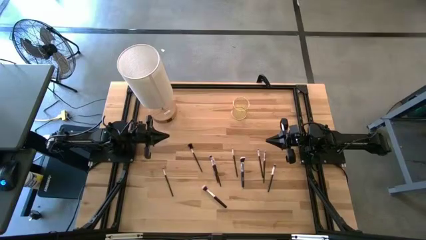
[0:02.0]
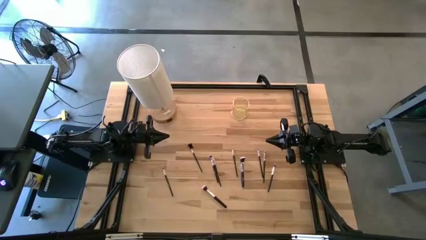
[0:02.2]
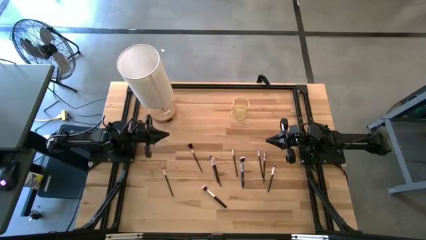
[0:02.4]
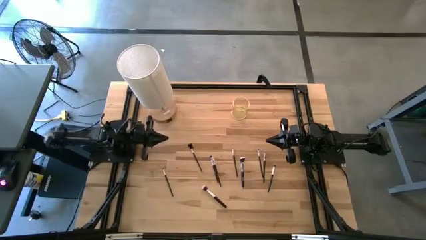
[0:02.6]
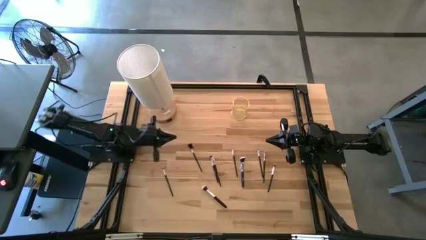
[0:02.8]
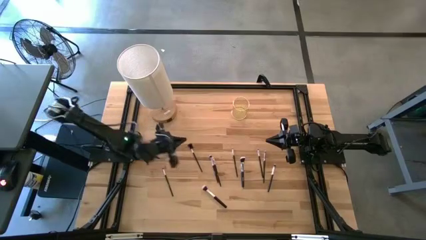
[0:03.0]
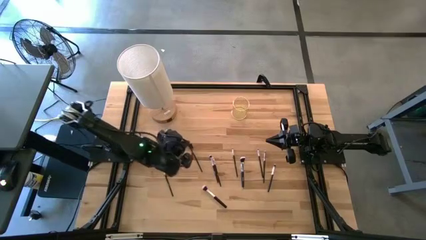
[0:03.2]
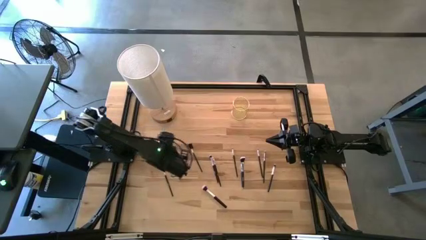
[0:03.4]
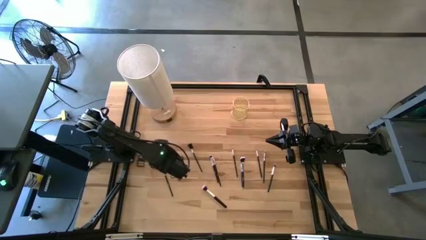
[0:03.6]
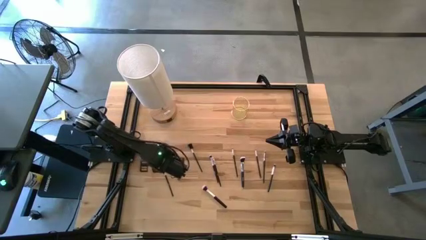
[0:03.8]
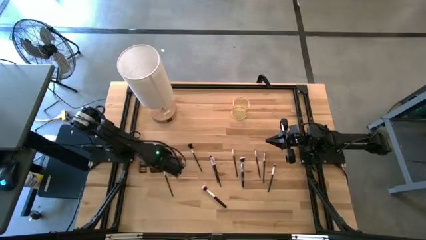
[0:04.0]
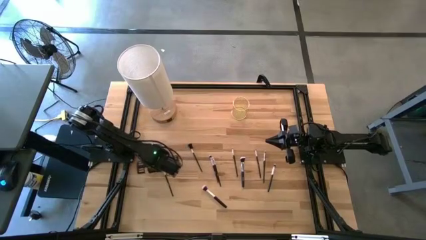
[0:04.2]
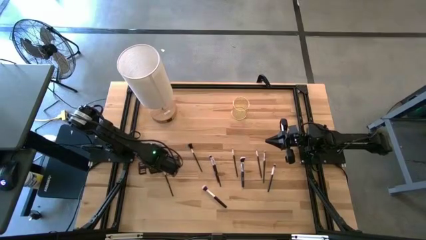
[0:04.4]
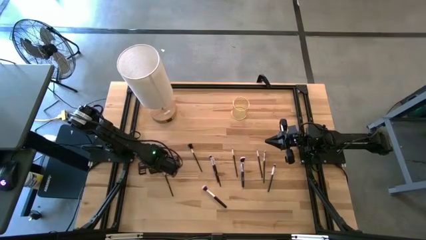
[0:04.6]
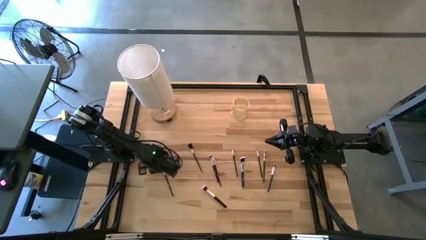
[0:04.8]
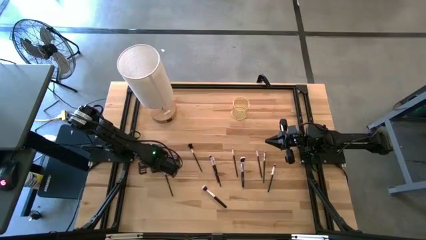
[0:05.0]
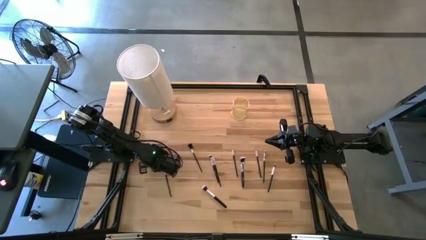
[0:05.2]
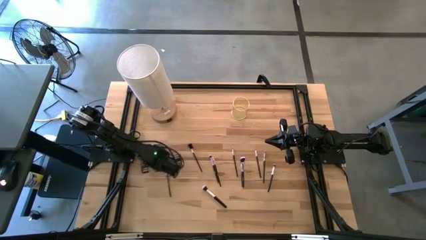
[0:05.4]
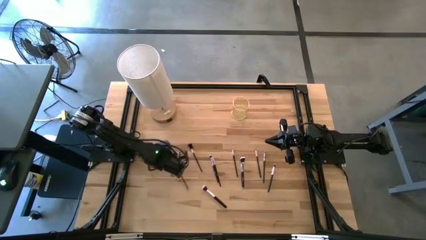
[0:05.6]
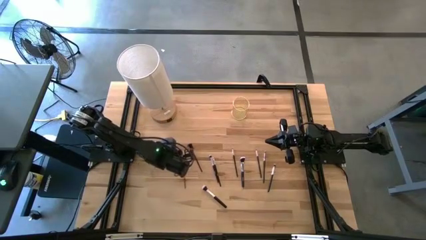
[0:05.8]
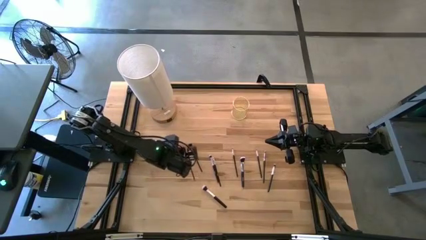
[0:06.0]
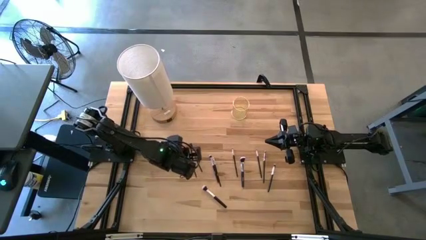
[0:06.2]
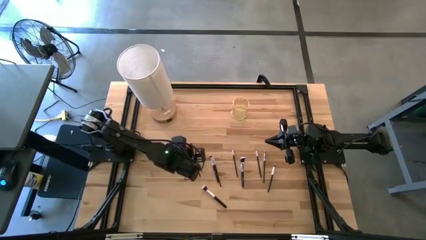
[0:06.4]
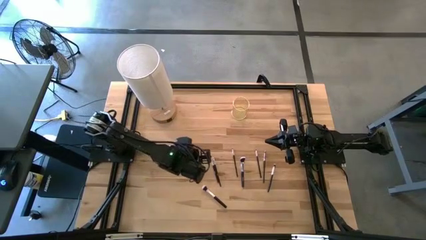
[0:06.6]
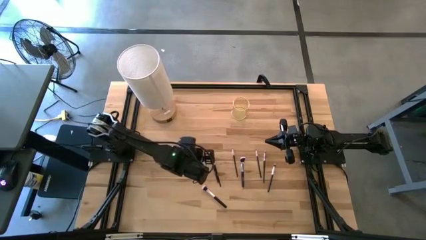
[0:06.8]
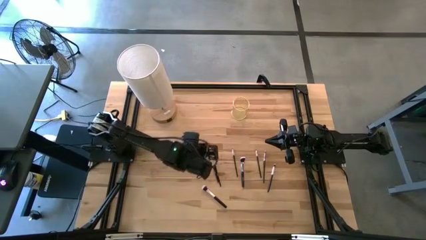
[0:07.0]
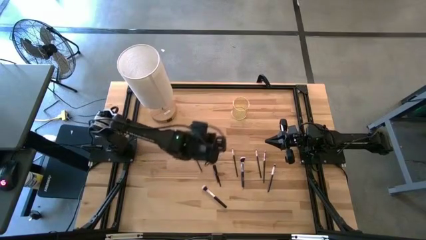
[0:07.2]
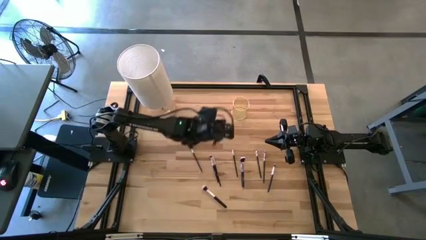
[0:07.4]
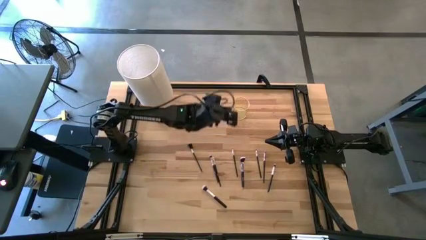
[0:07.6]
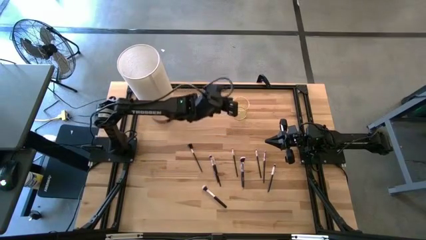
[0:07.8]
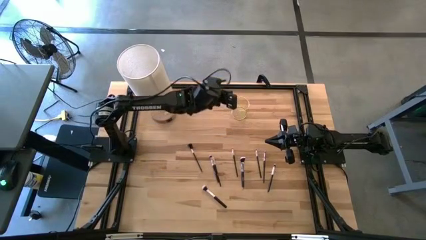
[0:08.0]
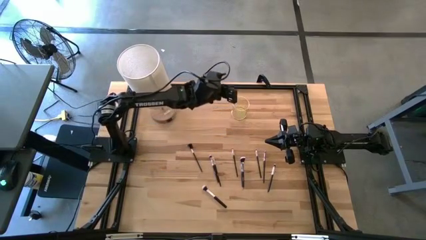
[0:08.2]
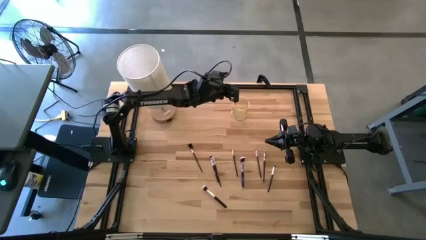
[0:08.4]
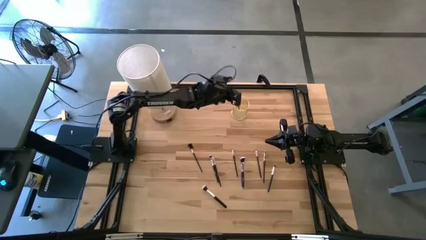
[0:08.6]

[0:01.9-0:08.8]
Task: Put items in baskets/containers
Put the silver eyeshadow brush into the yellow container

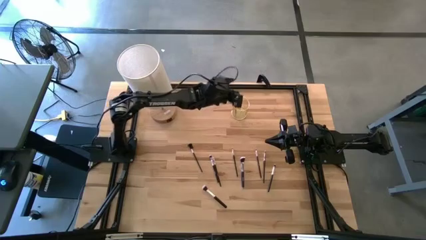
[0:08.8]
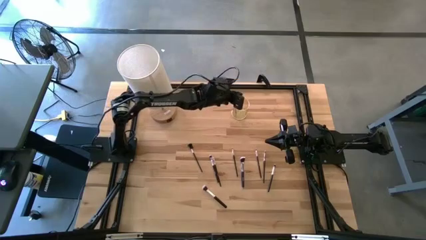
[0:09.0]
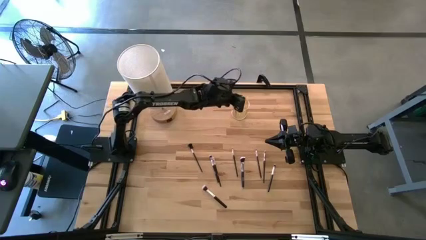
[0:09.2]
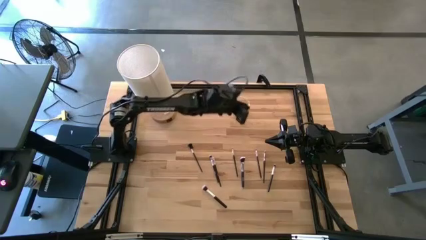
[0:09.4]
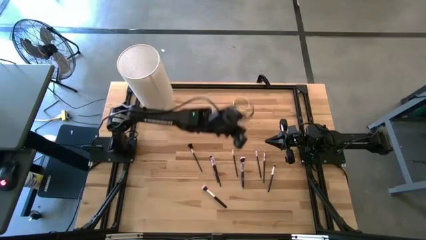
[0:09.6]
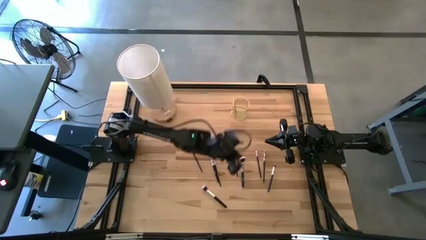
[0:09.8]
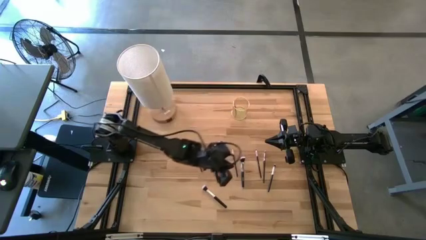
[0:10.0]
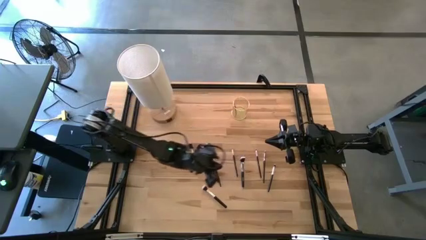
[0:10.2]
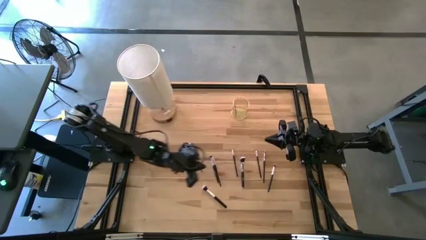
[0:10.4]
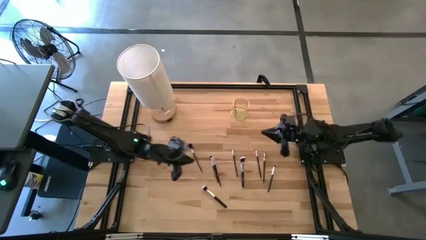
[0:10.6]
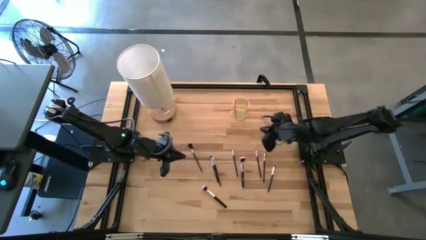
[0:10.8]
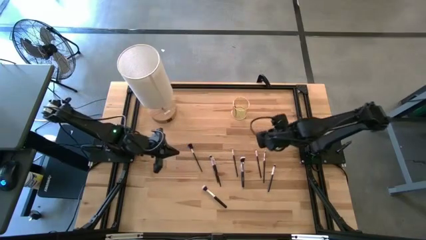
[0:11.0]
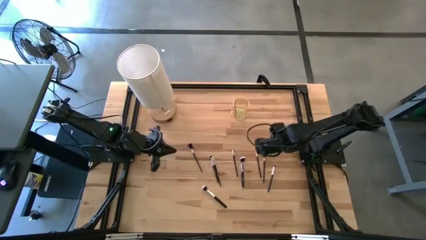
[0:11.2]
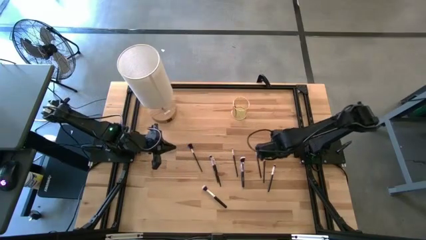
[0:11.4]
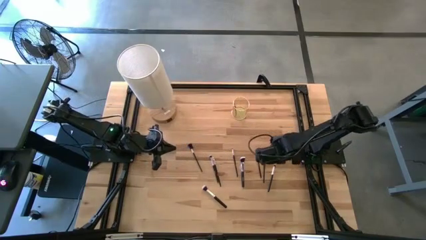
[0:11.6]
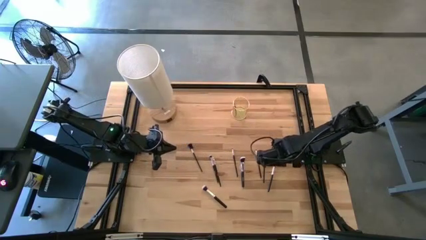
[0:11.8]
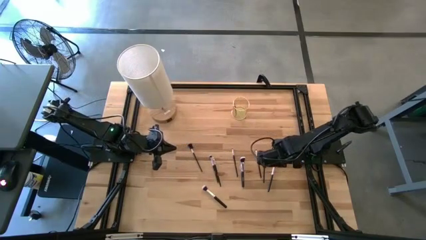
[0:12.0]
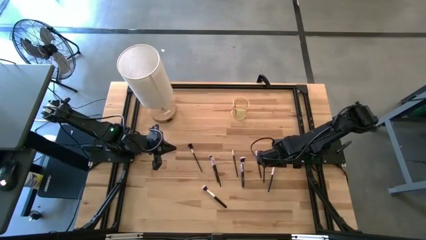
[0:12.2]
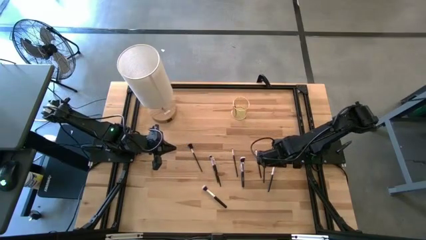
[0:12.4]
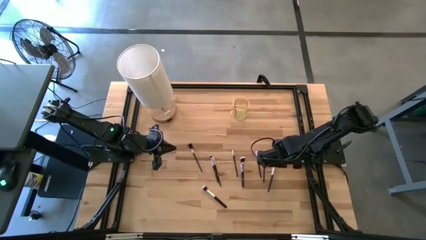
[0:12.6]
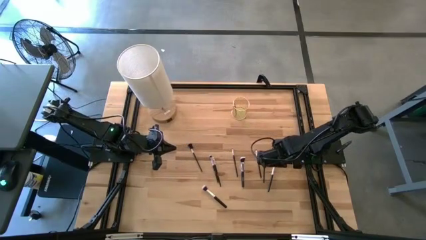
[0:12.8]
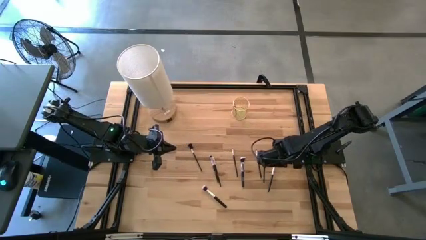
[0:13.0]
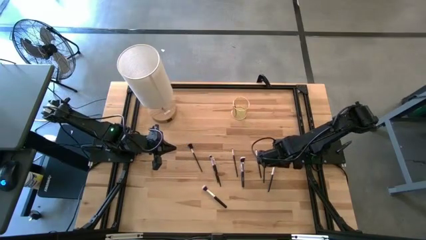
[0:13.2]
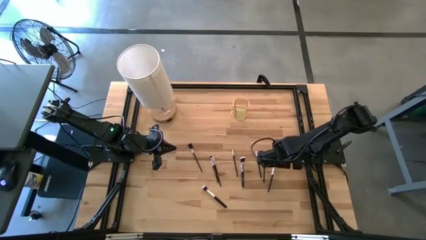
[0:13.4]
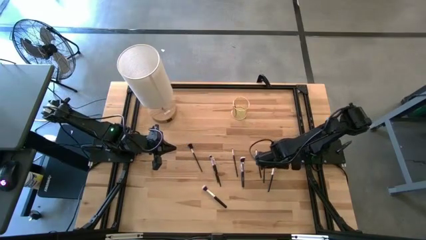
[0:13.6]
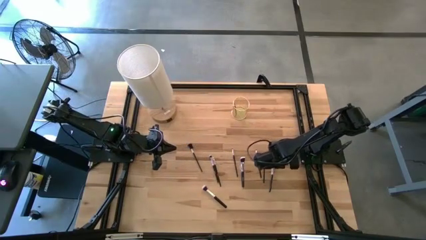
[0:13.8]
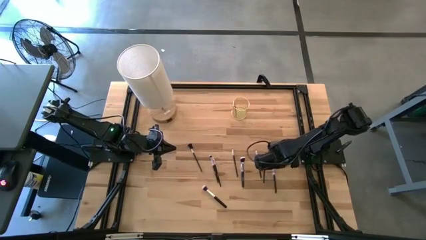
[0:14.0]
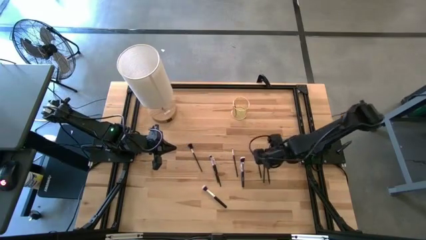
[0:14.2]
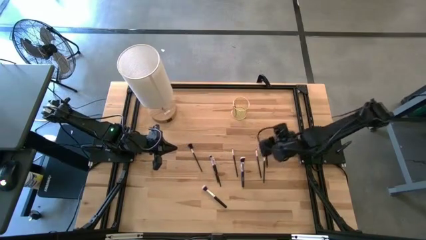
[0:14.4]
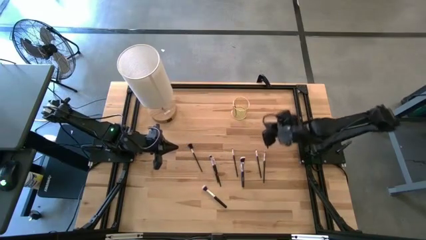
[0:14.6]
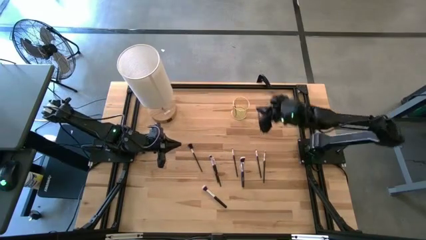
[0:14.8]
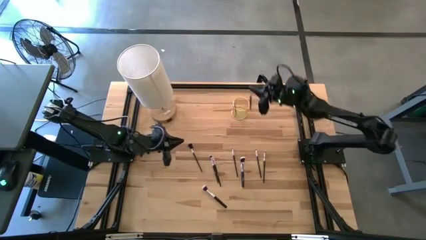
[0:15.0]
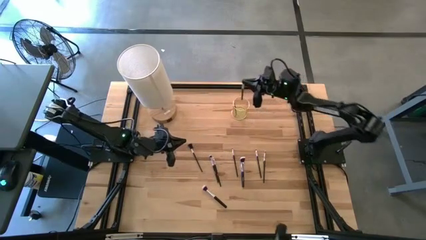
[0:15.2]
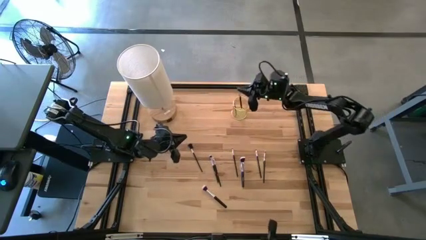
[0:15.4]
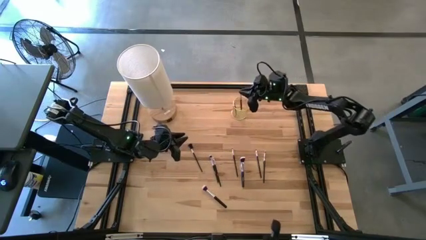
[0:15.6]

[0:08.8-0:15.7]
Put the silver eyeshadow brush into the yellow container

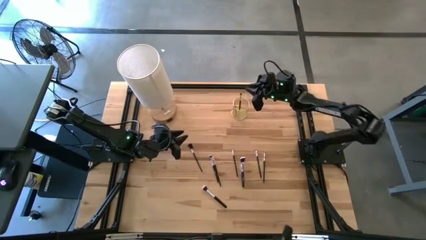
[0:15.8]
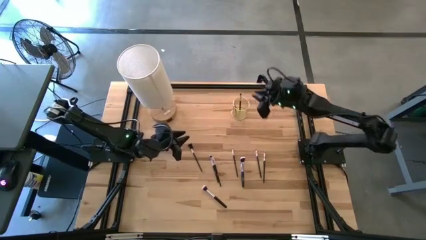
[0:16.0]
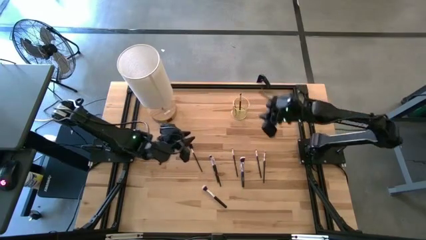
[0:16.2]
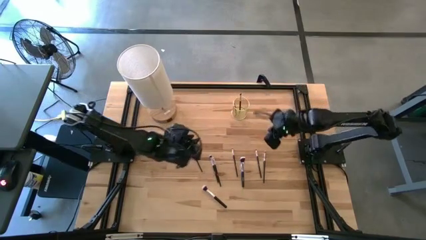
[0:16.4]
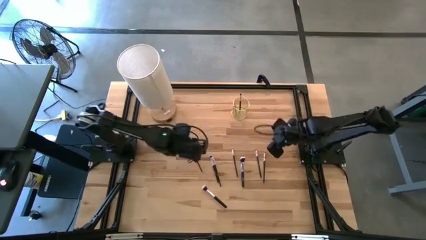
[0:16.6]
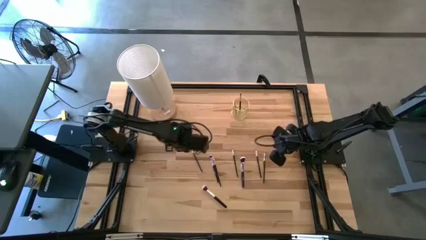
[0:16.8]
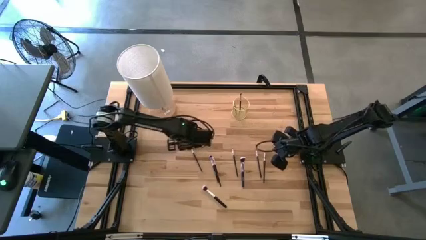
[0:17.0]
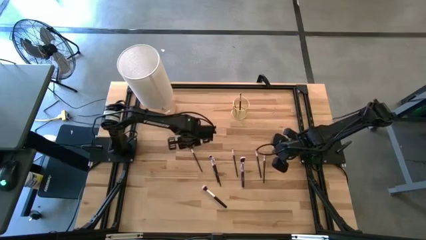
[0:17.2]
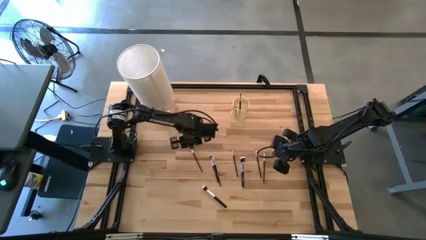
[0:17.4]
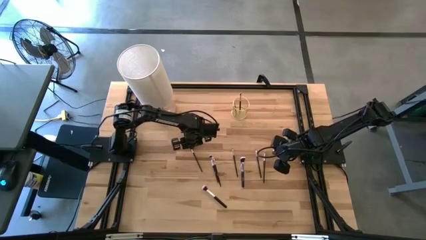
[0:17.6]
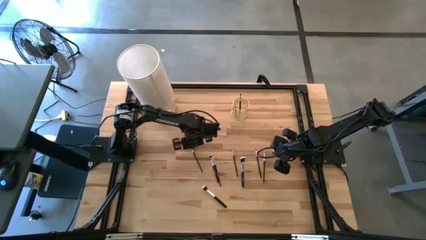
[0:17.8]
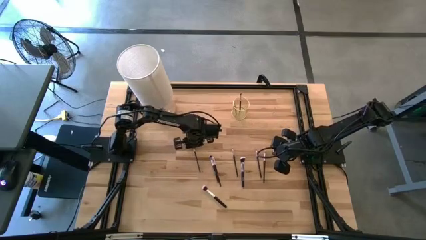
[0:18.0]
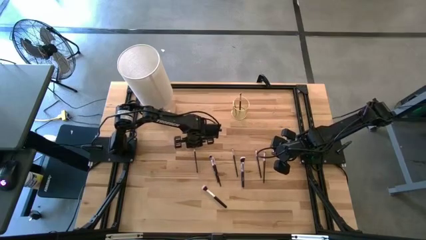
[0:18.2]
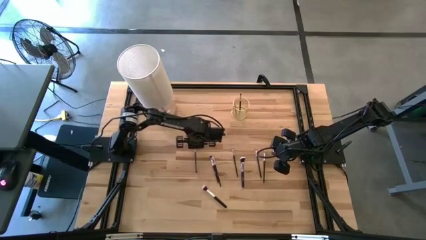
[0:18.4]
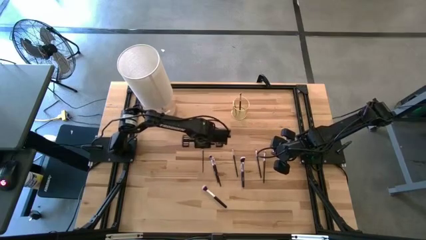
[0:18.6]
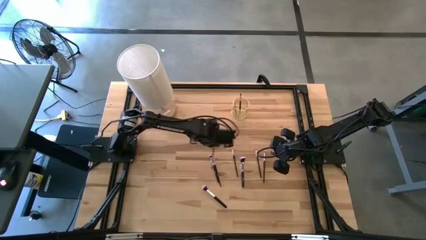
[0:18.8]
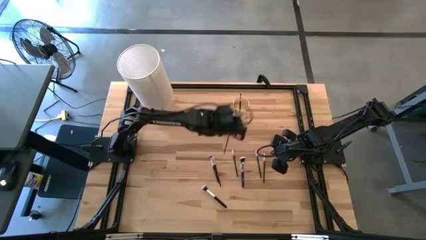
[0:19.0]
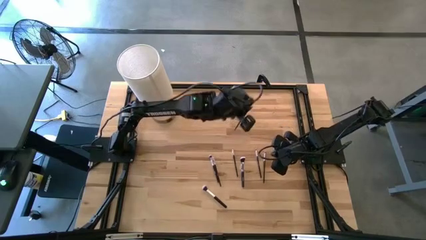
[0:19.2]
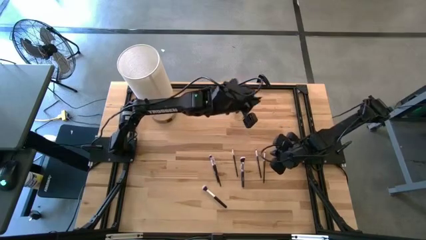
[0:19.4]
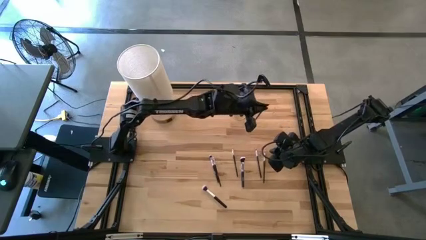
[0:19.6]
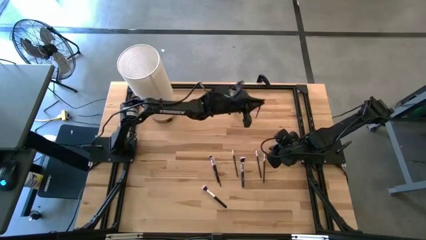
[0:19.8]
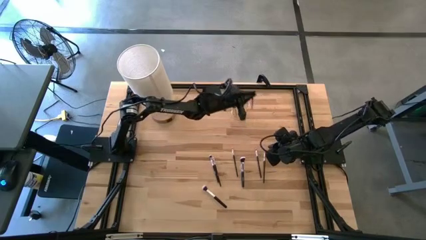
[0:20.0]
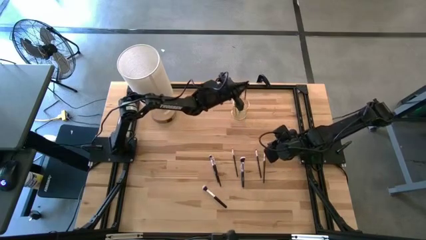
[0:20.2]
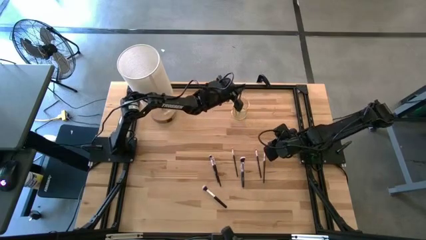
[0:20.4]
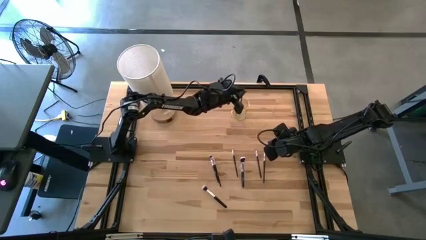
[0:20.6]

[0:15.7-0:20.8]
Put the silver eyebrow brush into the yellow container
